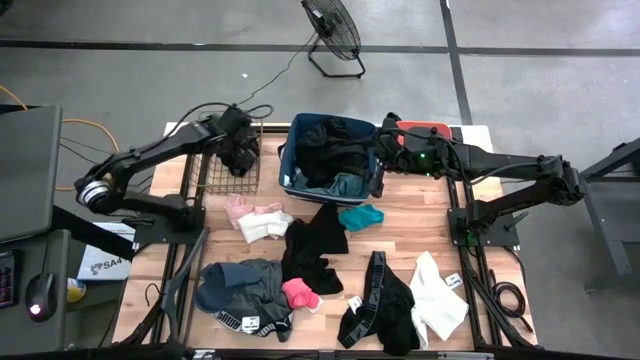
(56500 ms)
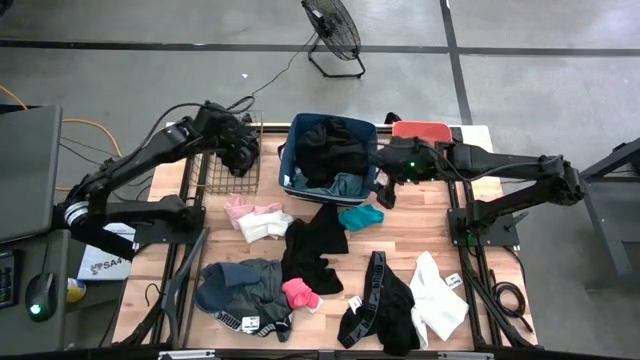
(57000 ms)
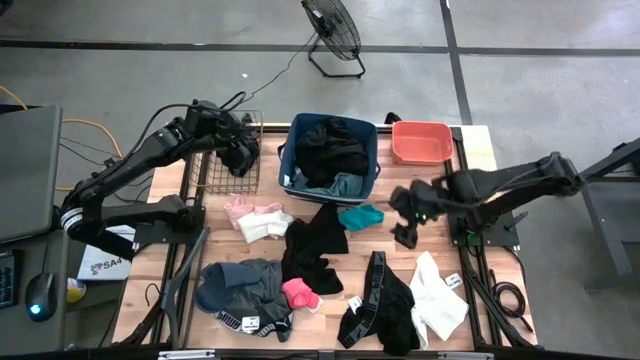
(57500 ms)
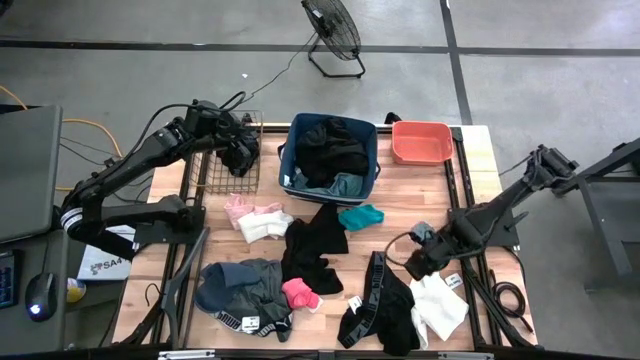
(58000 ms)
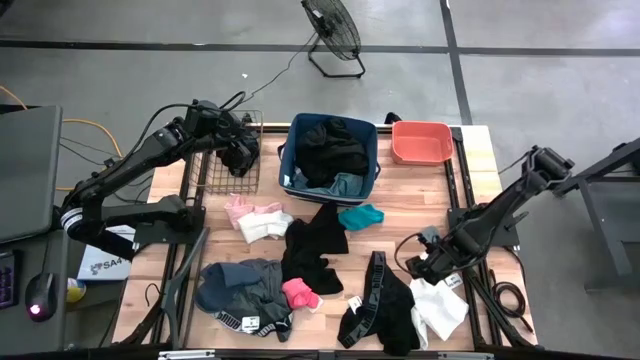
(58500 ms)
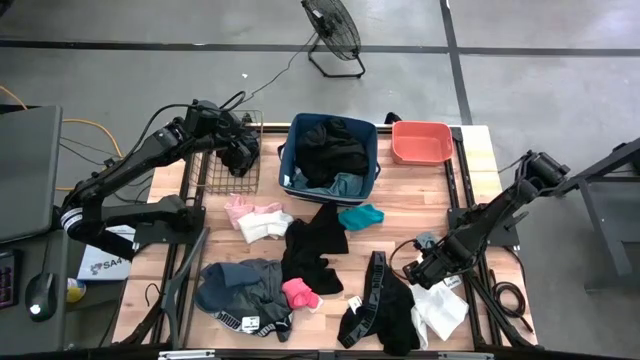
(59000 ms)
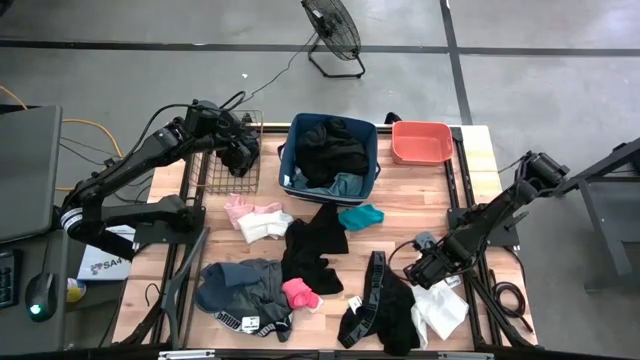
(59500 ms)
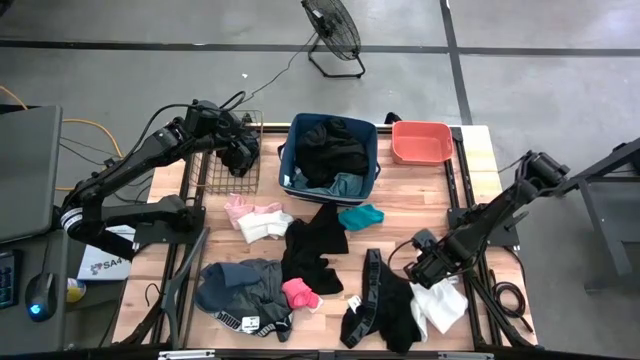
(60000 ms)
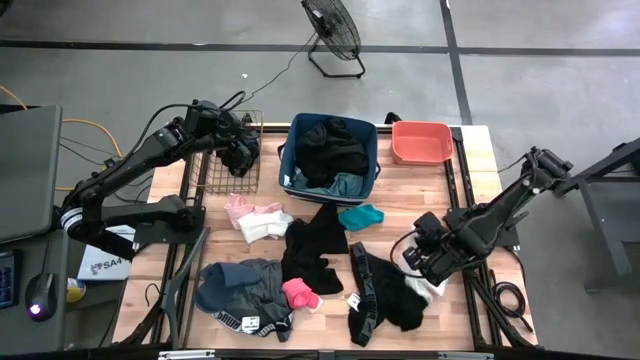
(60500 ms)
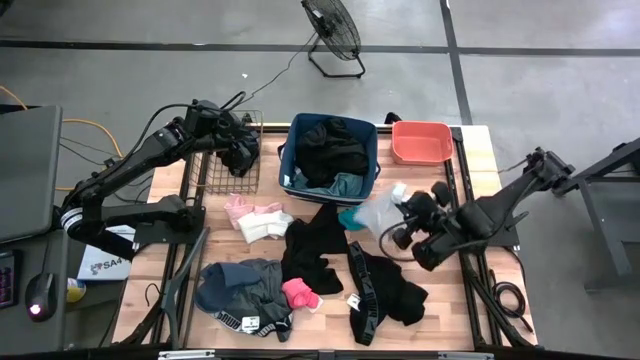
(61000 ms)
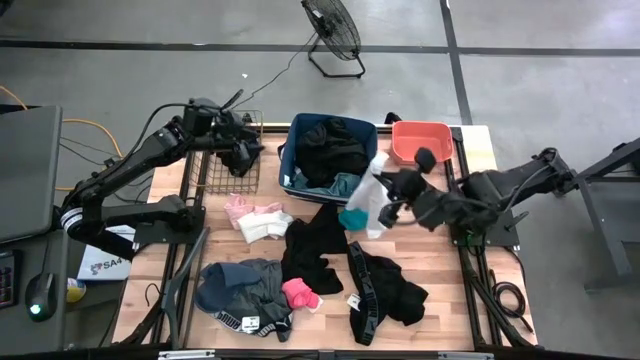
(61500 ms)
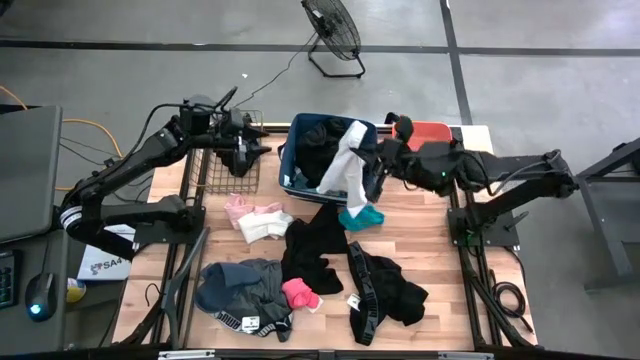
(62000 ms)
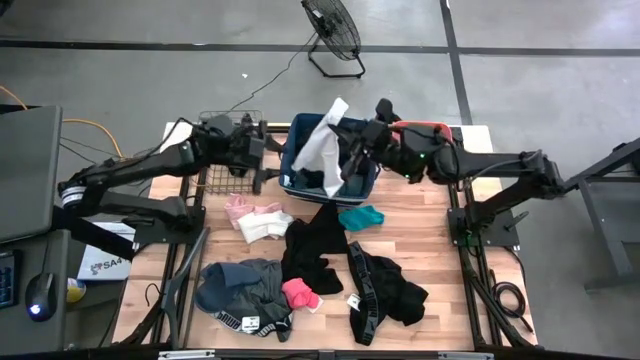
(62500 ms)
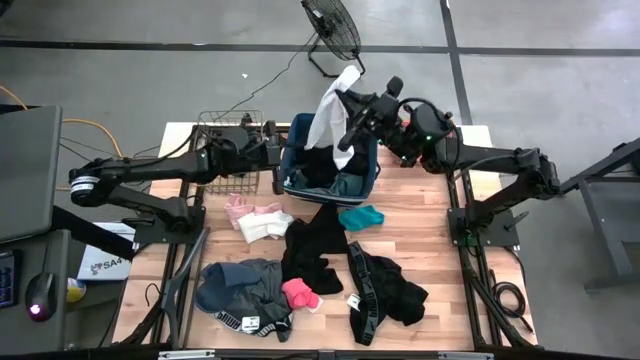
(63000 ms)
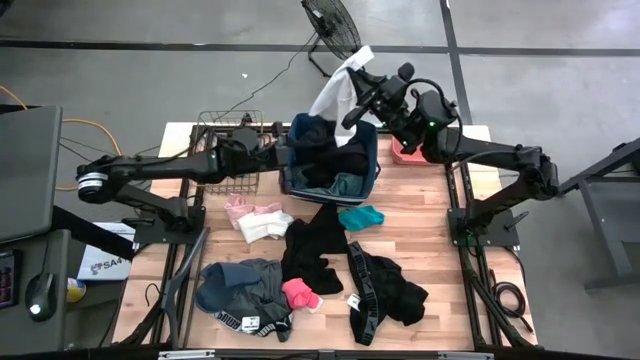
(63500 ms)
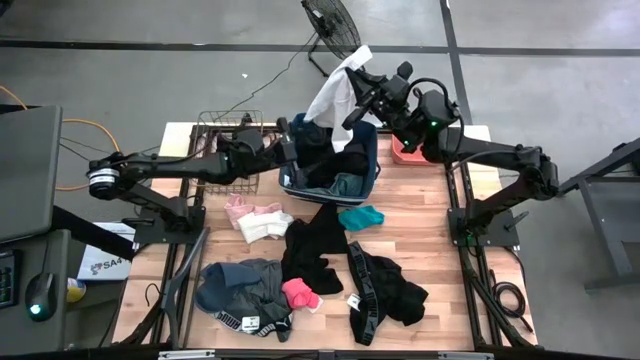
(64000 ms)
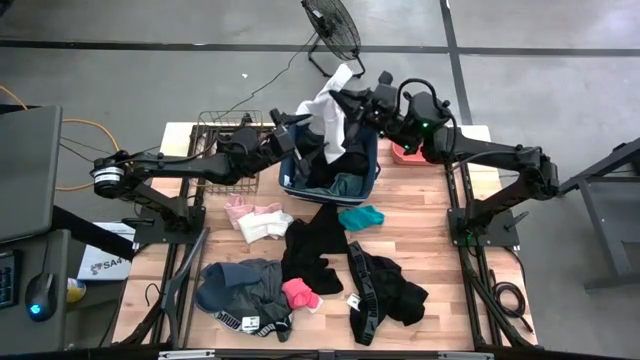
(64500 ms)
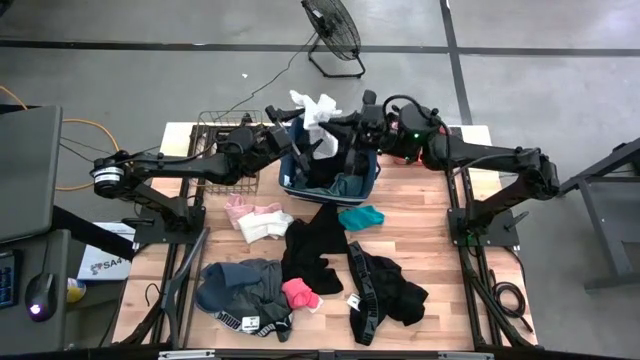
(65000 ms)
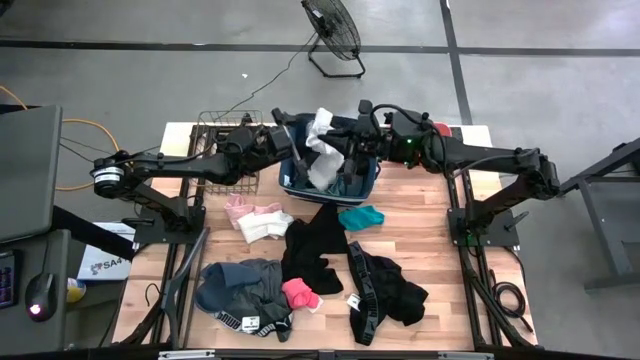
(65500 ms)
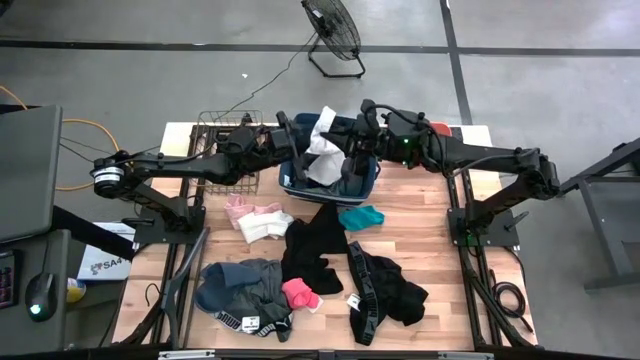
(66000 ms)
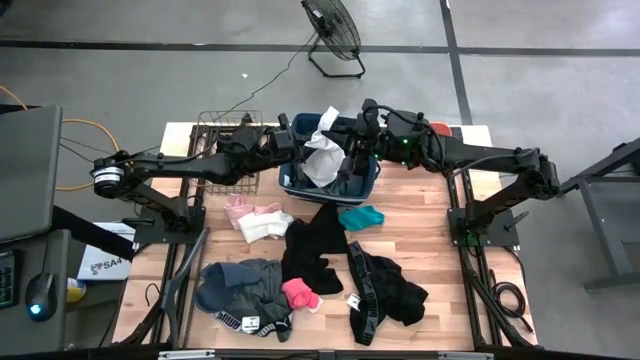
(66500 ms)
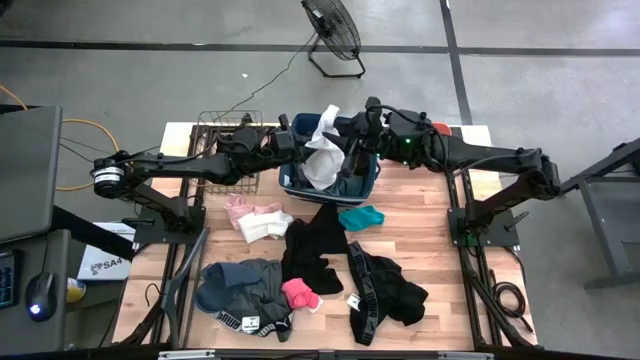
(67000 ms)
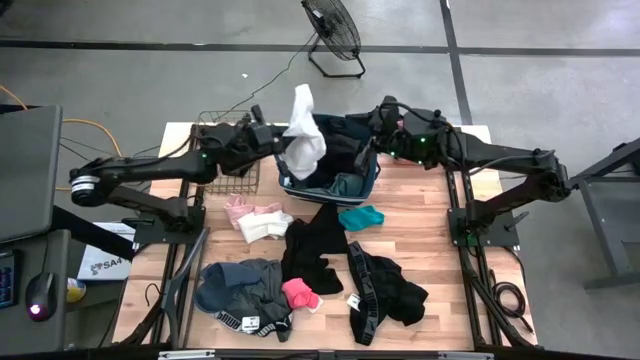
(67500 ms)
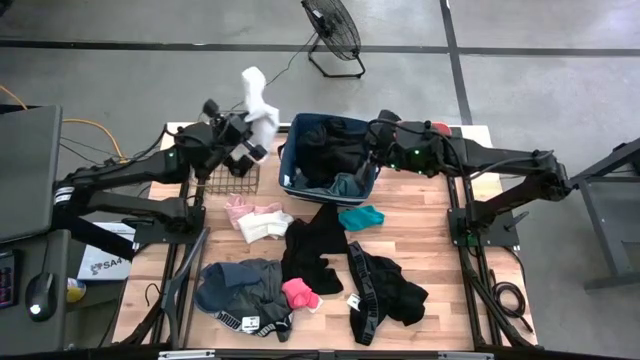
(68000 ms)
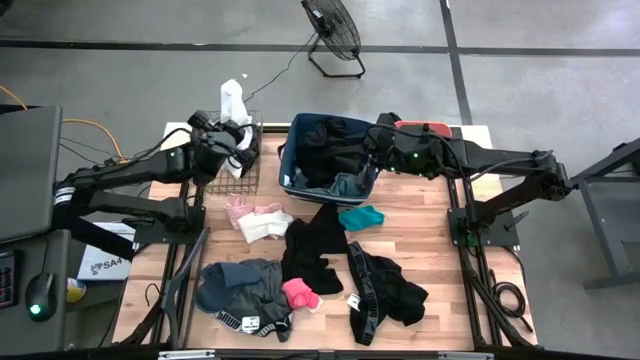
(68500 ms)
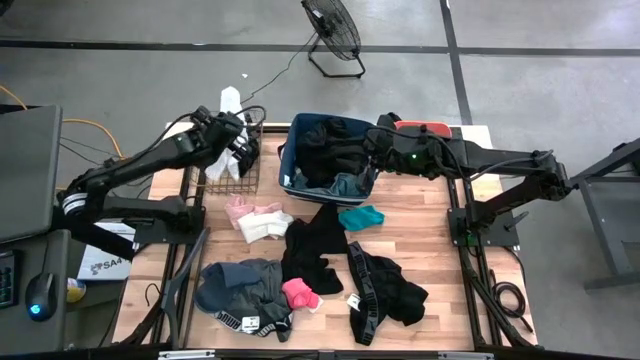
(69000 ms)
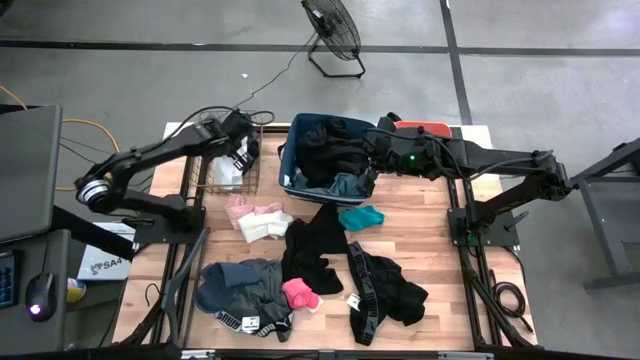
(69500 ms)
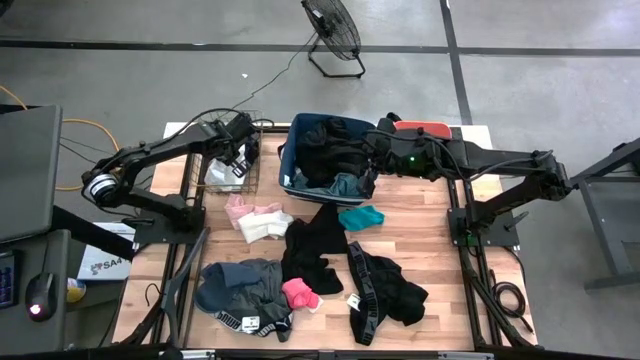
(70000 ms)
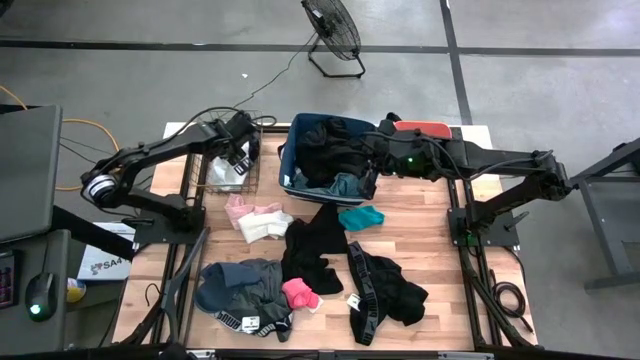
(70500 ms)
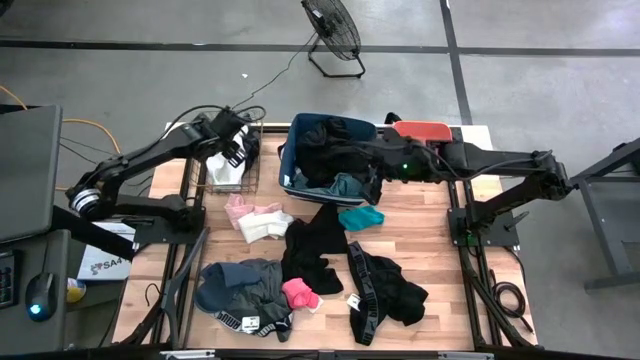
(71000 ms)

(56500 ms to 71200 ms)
Task: Pick & Place Cloths
Put the white underwear into the wire basket

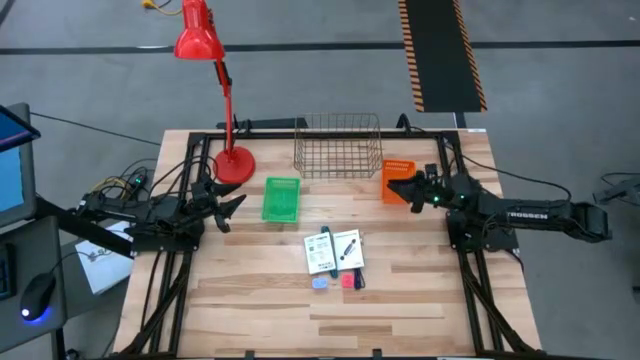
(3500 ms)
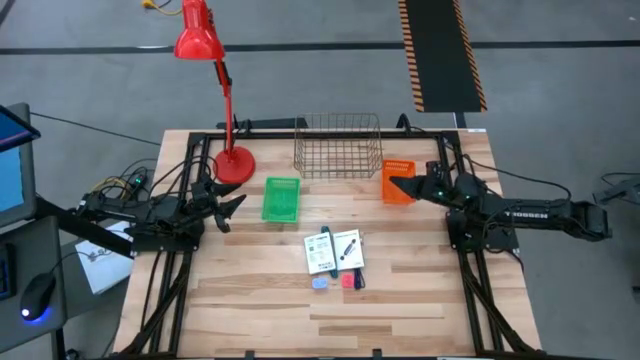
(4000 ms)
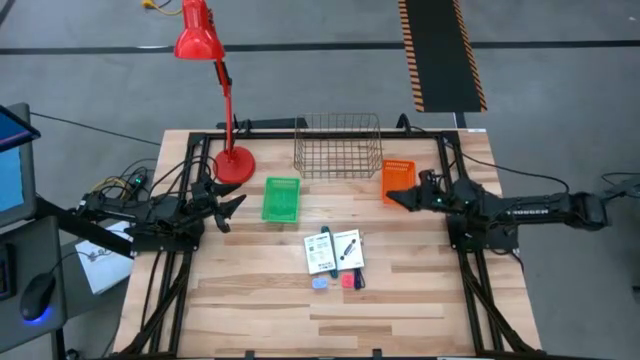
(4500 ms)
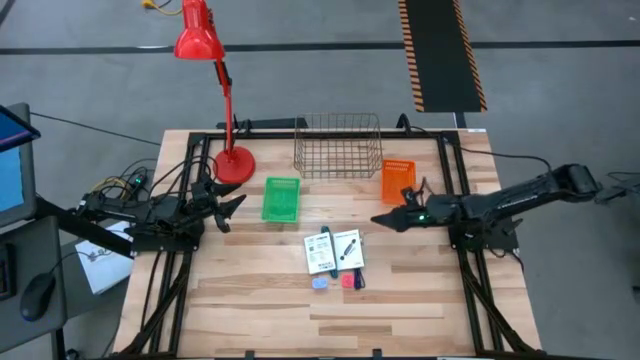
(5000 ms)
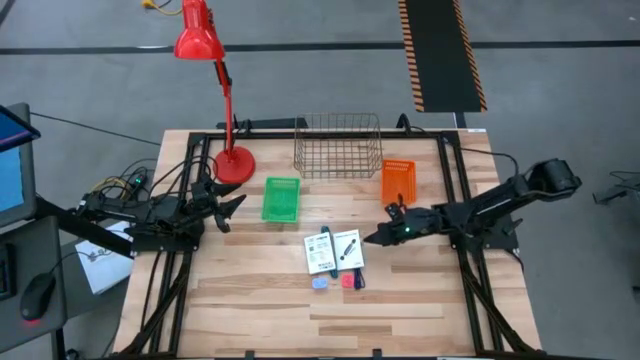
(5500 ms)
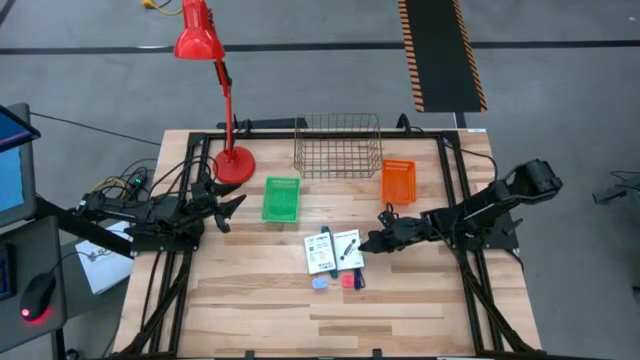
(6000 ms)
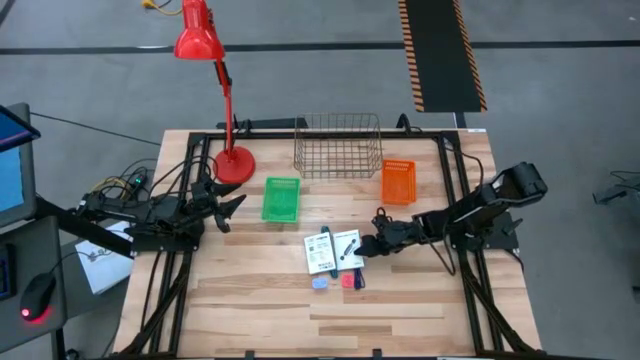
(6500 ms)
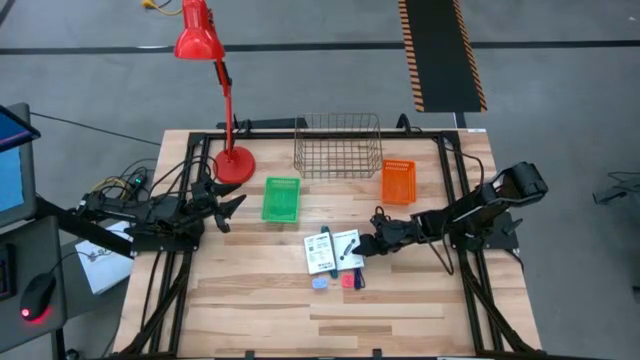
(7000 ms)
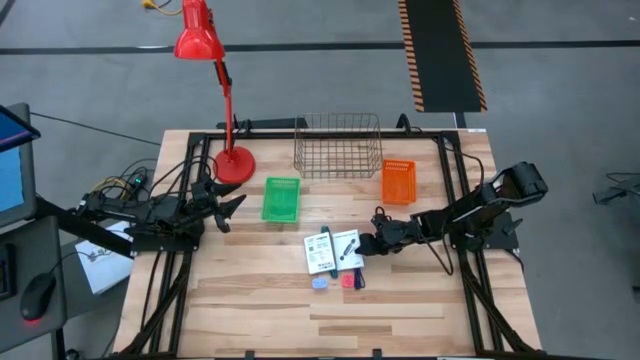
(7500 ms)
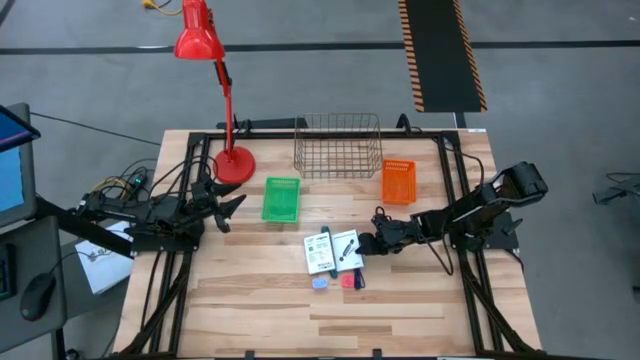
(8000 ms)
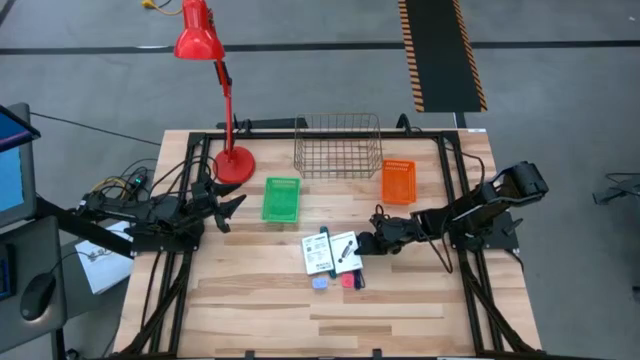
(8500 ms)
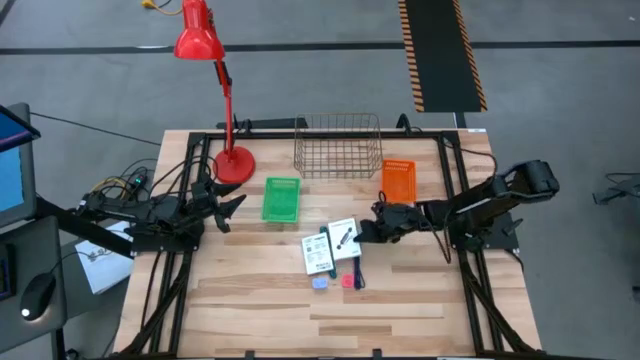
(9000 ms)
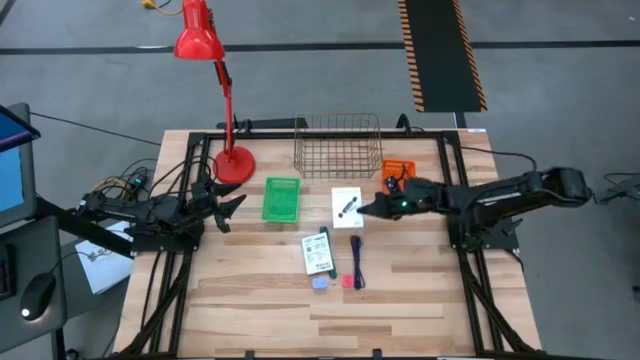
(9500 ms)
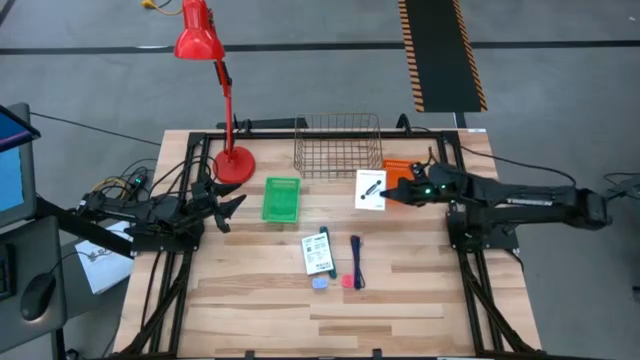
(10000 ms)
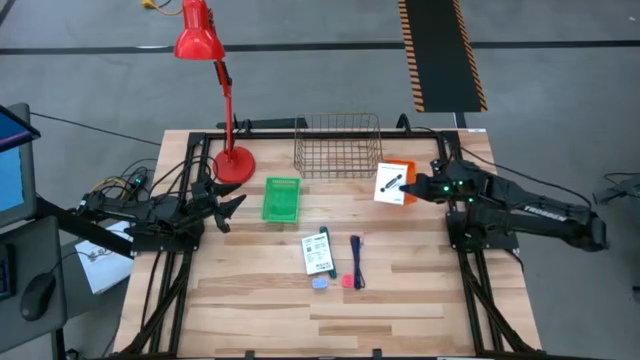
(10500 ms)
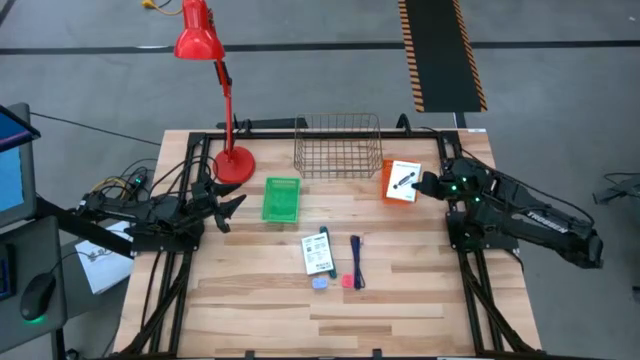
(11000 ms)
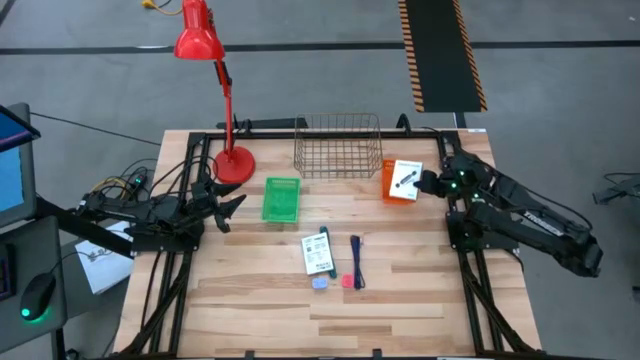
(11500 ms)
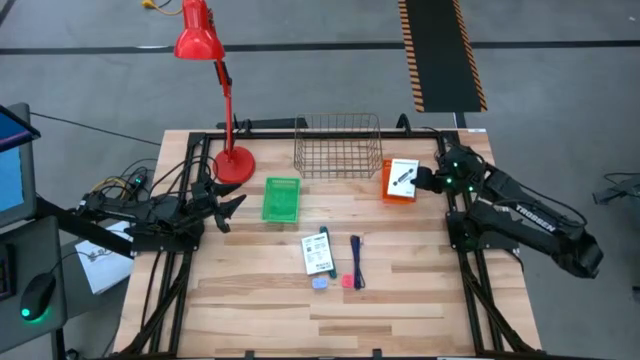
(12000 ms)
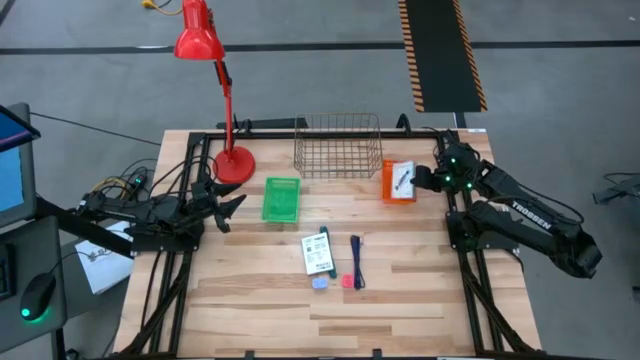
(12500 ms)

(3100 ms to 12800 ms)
Task: Pick and place items into bin
Put the right white card reader box into the orange basket
